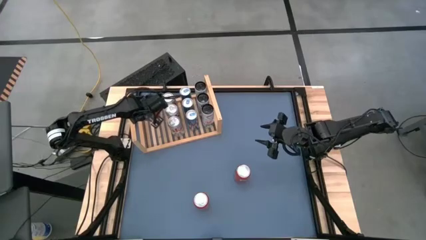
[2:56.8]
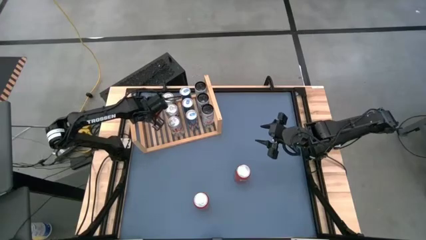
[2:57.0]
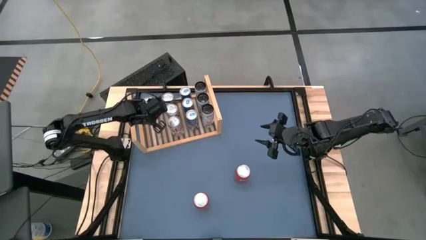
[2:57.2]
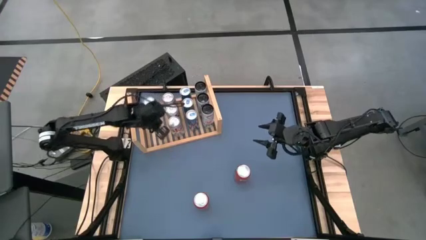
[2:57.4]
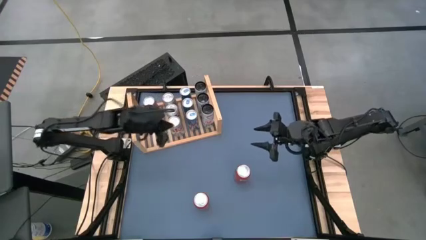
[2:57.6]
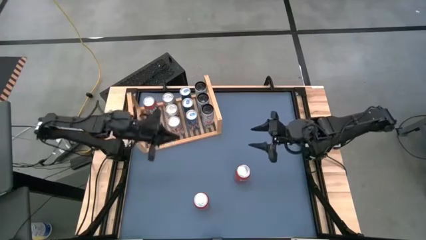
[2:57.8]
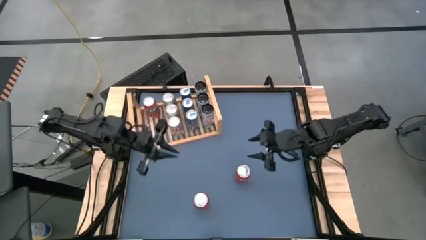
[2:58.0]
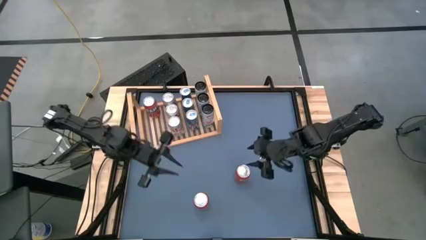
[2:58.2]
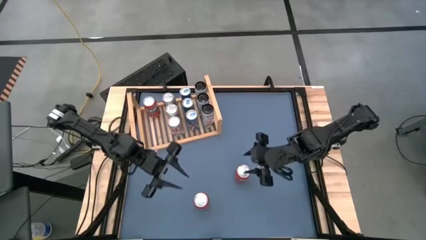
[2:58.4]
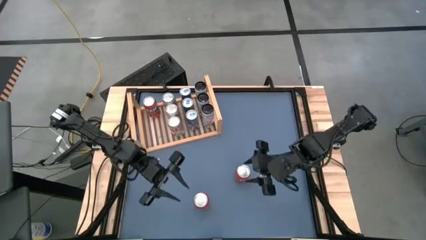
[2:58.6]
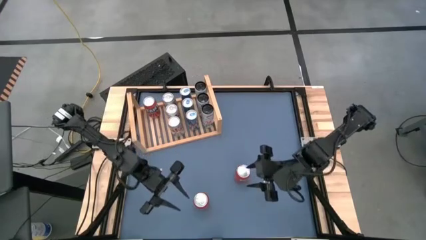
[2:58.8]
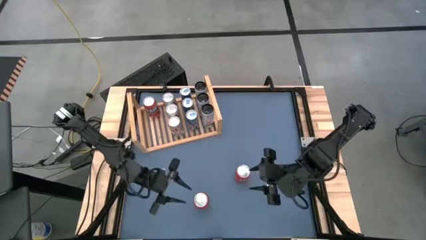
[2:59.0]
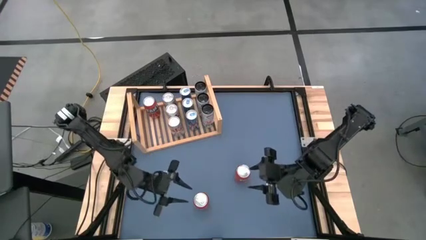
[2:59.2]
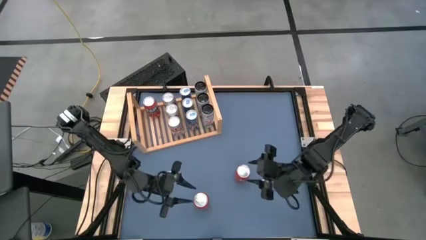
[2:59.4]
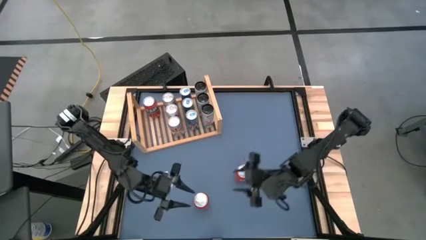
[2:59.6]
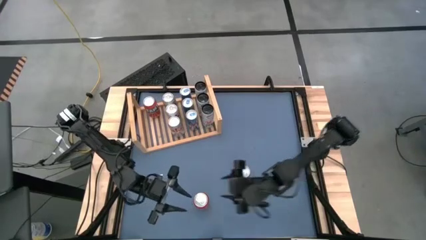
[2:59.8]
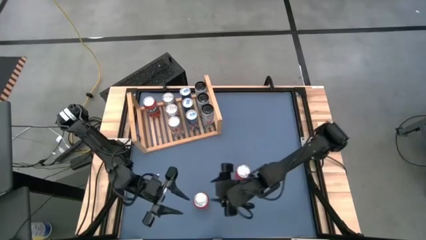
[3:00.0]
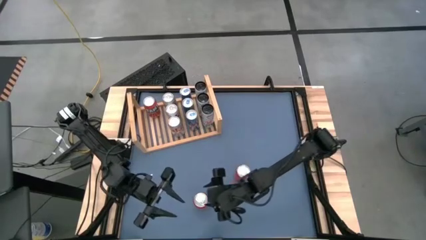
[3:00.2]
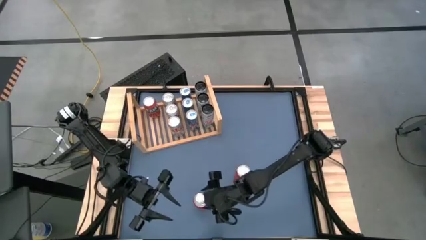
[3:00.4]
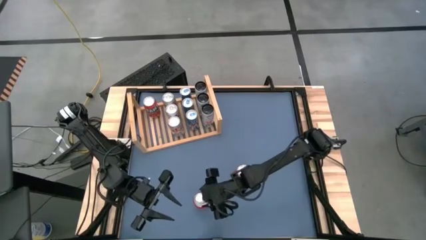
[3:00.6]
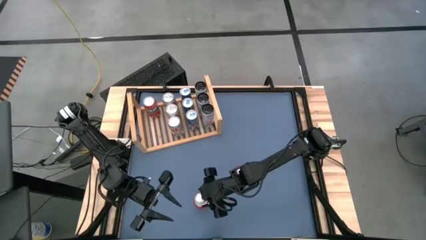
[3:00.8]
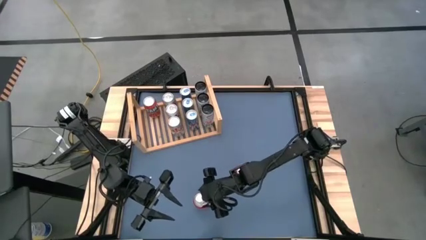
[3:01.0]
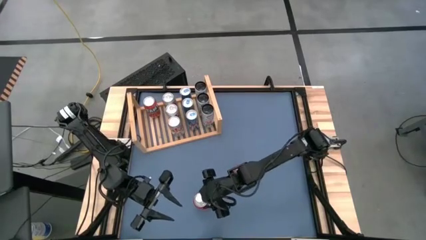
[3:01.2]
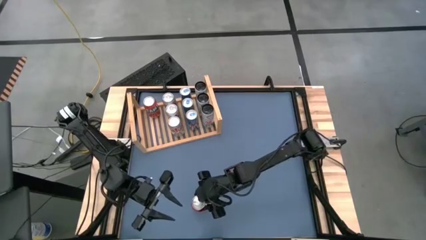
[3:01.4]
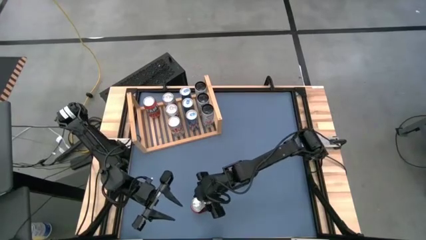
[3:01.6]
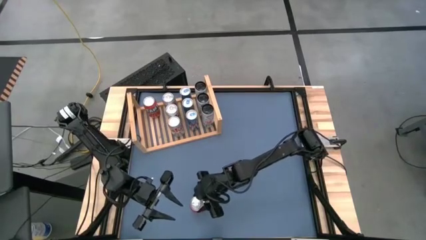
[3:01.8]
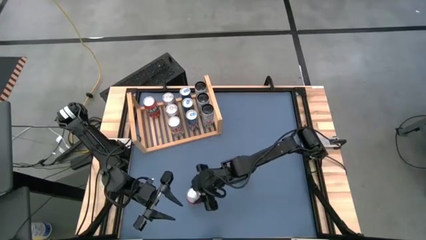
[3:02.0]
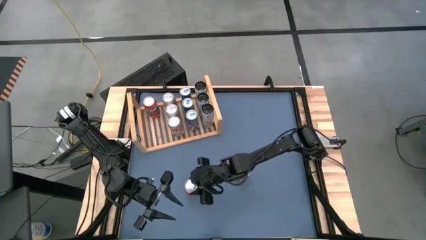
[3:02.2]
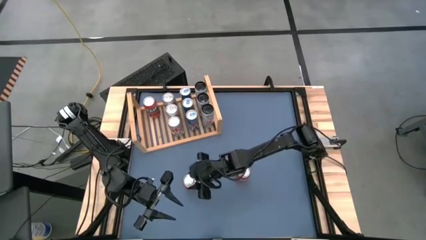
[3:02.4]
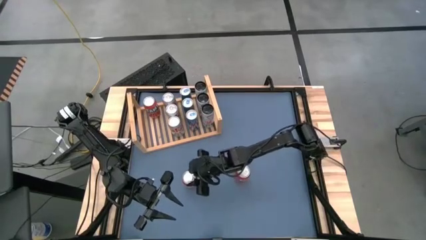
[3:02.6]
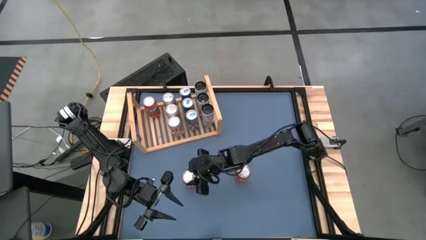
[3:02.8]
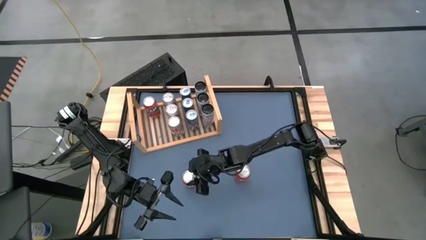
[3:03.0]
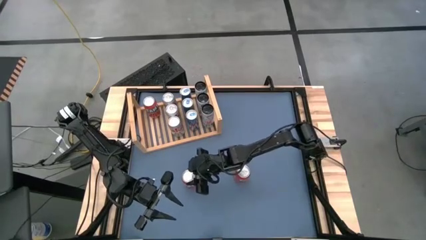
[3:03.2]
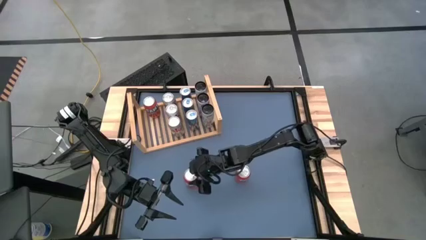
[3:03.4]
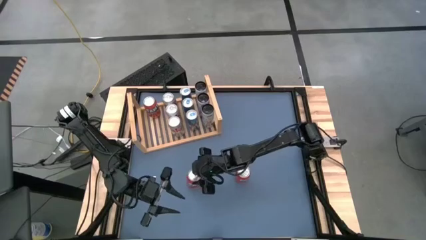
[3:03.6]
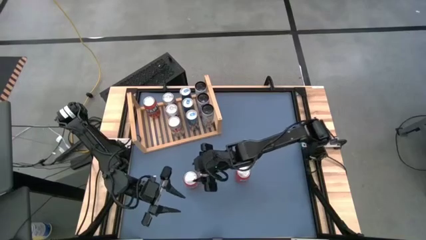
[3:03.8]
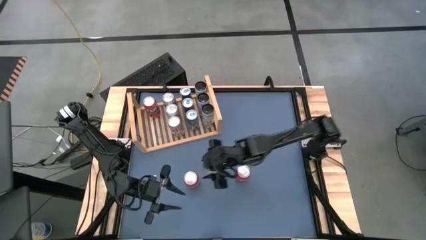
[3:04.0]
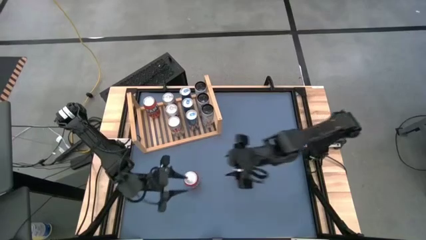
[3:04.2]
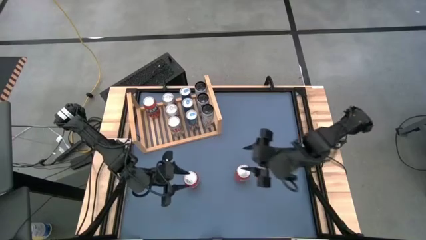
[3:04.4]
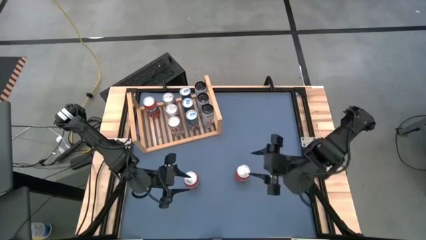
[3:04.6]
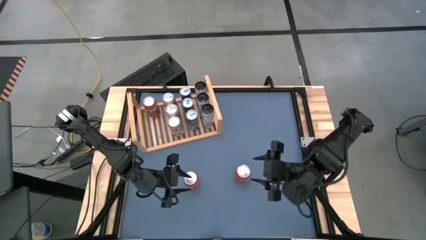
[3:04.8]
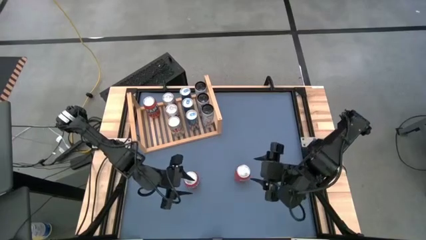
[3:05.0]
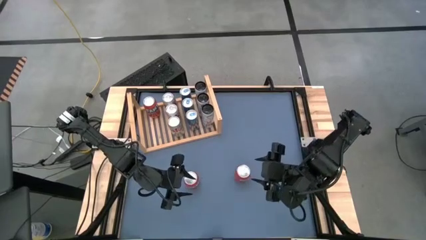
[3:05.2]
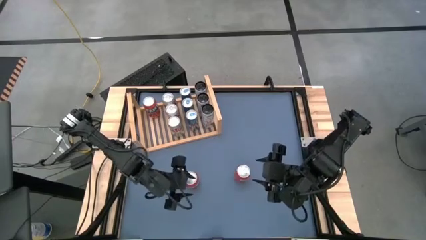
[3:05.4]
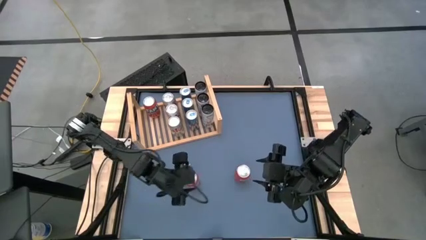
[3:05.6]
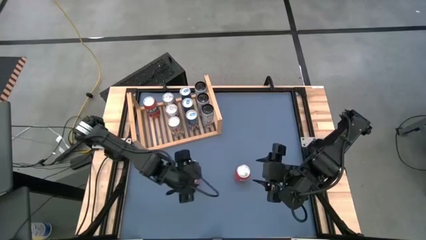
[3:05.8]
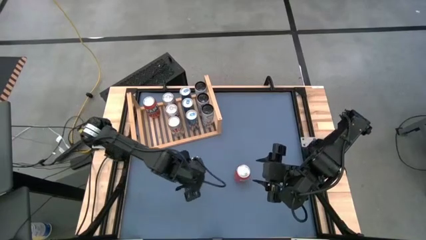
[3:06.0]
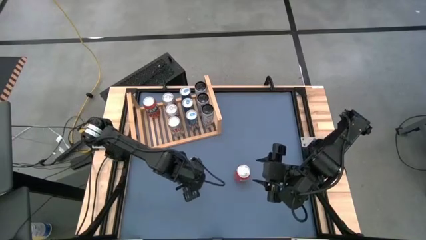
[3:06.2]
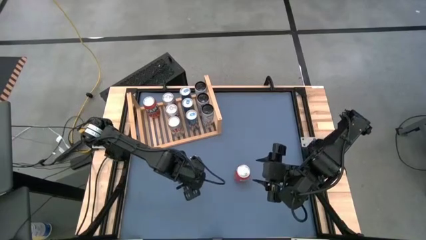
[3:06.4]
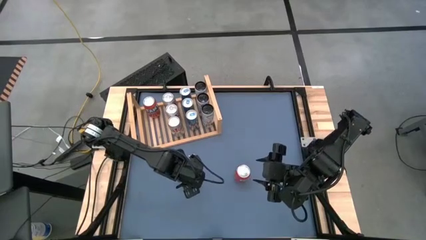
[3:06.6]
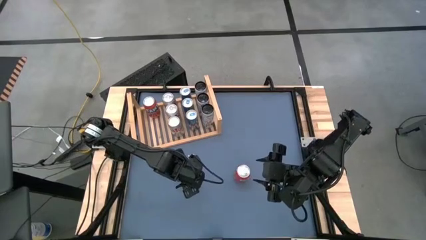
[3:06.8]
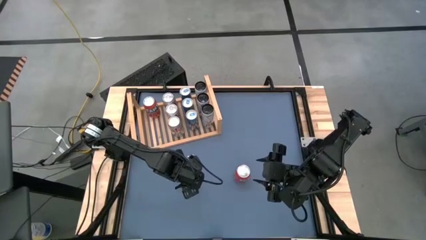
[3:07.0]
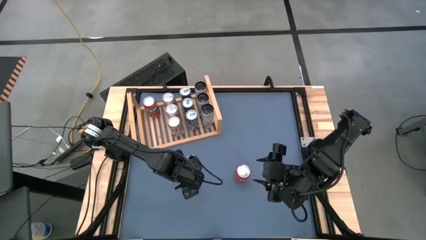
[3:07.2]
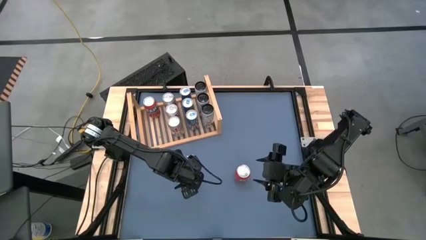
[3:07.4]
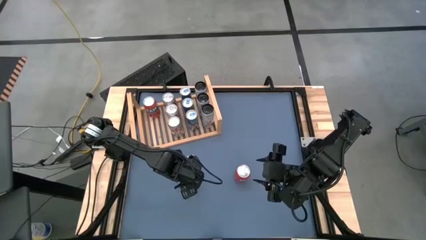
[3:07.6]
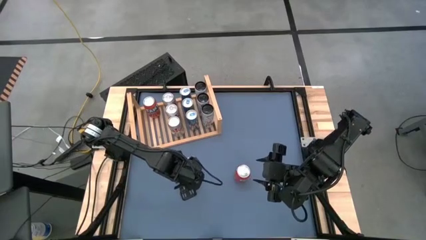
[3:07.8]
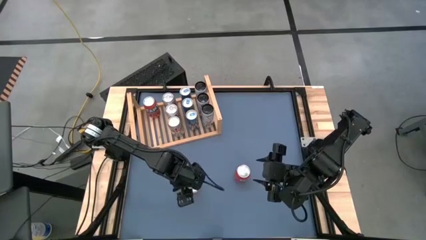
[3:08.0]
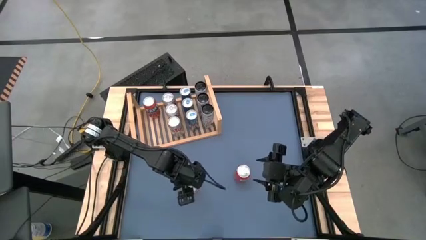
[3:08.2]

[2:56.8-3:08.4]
Task: Place canned beverage on shelf
Put the left red soda can on the shelf aligned with the other red soda can

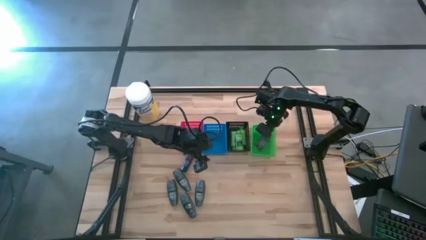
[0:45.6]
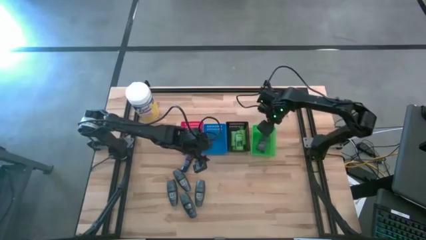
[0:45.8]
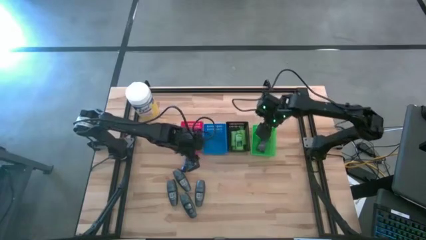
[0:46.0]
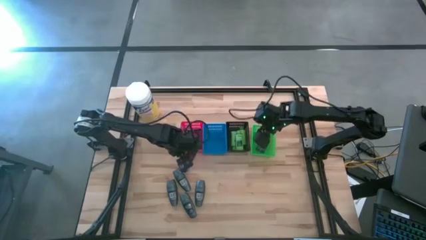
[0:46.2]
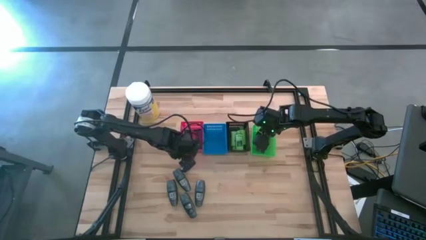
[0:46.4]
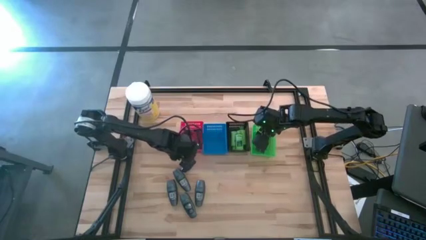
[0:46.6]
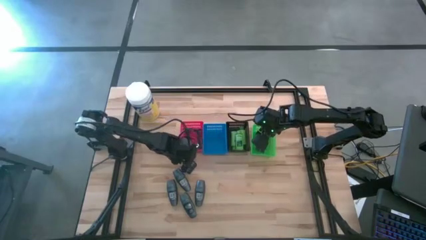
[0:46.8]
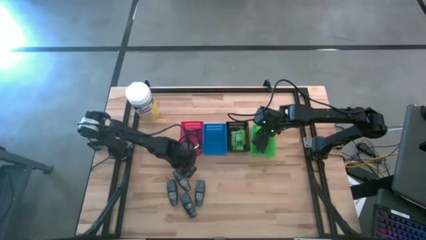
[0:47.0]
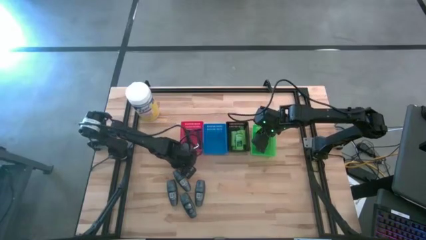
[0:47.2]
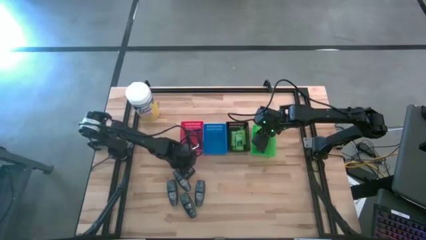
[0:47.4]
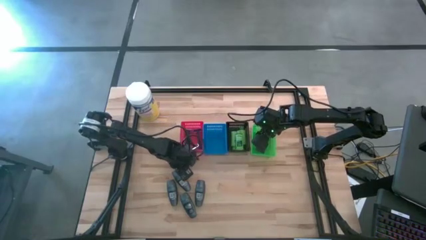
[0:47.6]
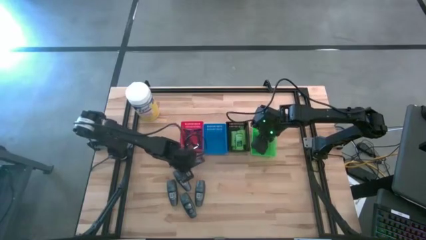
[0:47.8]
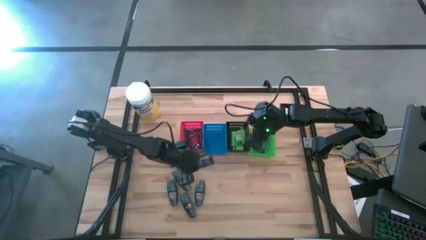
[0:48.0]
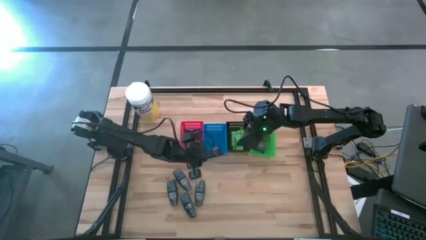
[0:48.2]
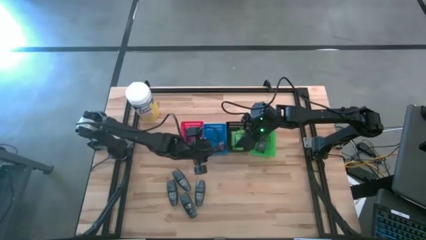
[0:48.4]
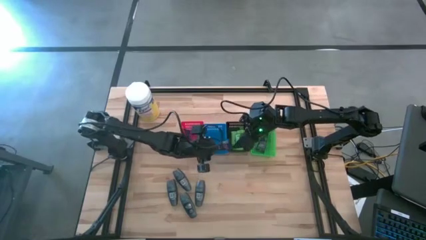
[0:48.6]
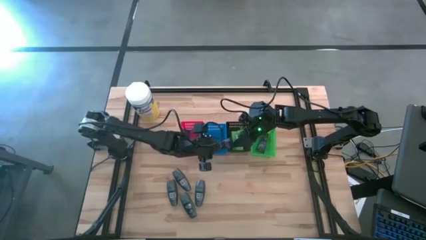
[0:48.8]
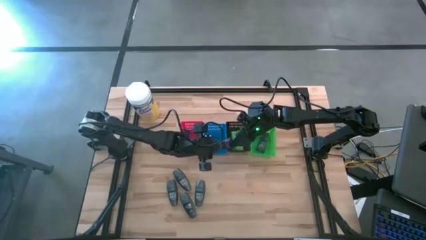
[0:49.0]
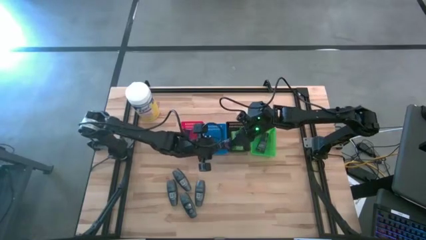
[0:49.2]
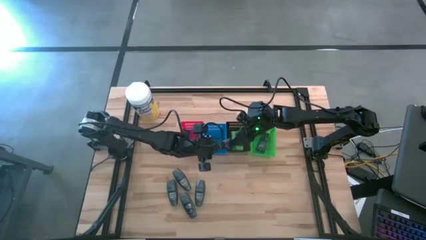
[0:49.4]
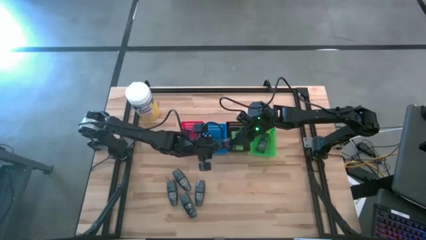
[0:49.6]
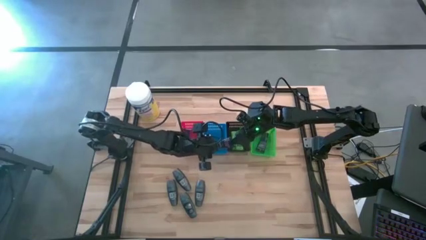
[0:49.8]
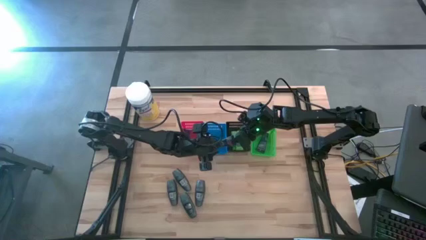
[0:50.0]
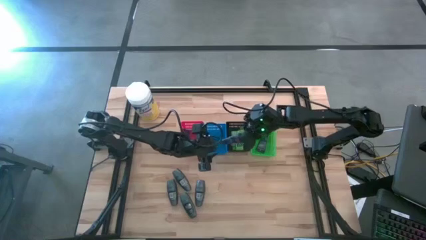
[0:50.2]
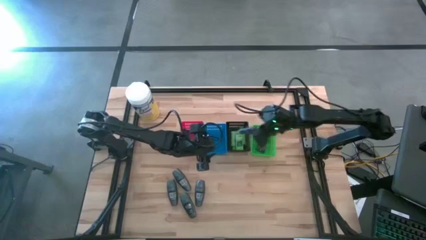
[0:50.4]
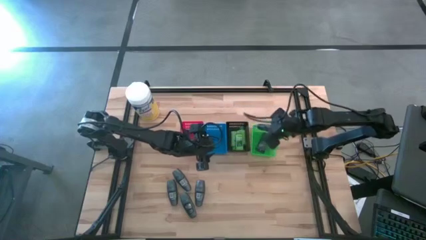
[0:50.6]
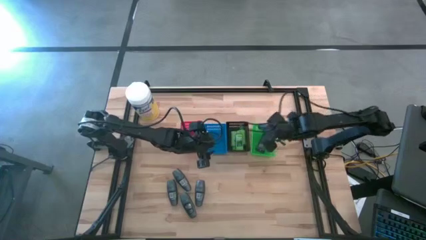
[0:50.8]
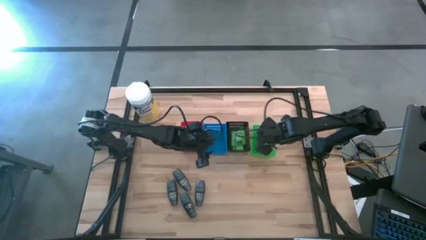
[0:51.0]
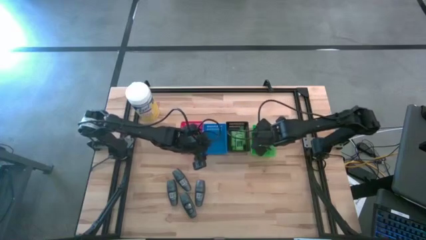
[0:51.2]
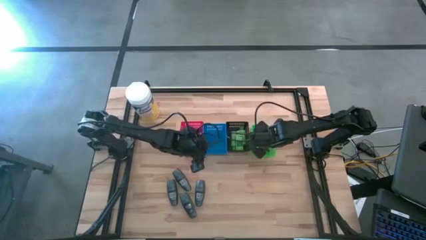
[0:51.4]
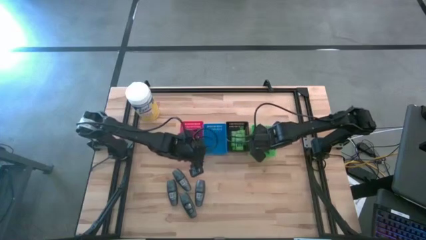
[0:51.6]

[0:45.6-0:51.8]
Task: Pick & Place Travel size toiletries
Put the shaving cream into the green basket

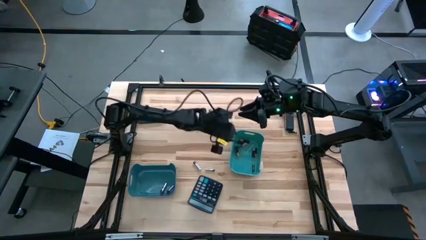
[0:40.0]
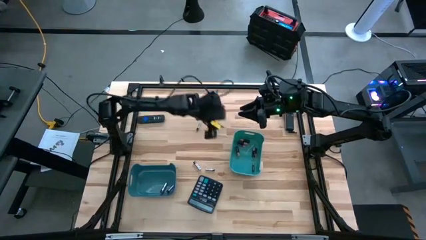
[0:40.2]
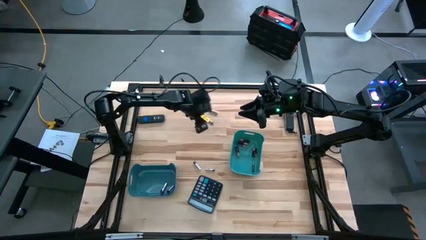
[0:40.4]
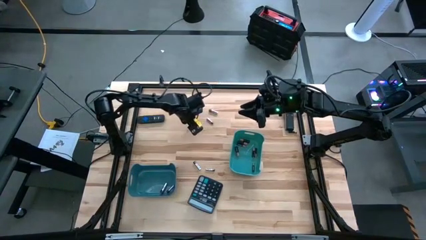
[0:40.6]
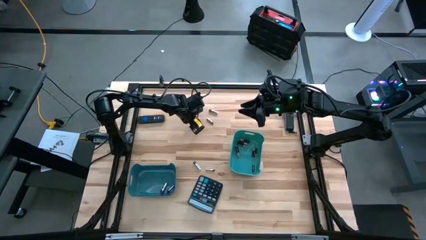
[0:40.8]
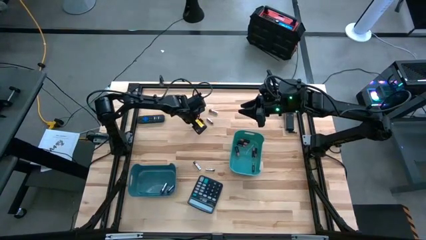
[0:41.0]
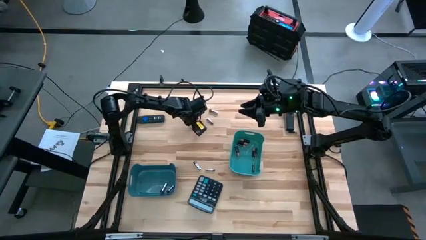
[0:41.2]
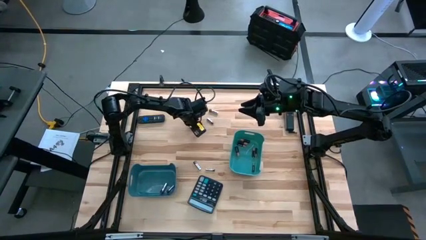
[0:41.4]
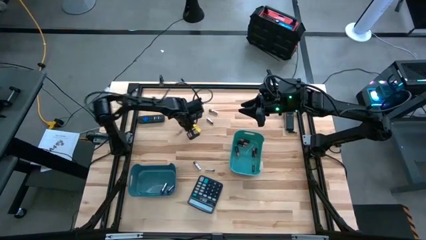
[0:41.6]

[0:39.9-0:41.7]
Task: Sort batteries
Put the silver battery into the dark blue bin
